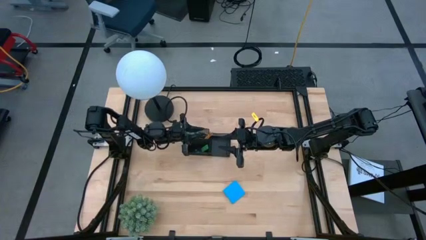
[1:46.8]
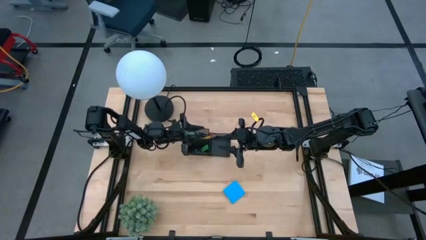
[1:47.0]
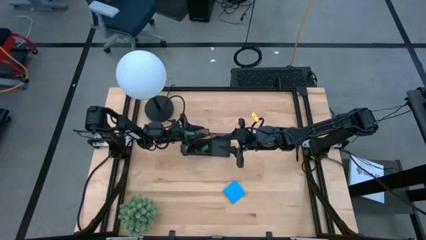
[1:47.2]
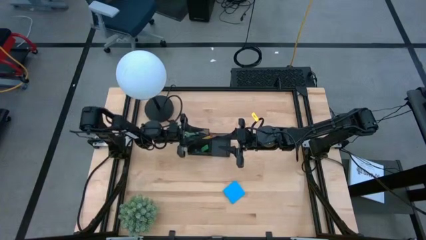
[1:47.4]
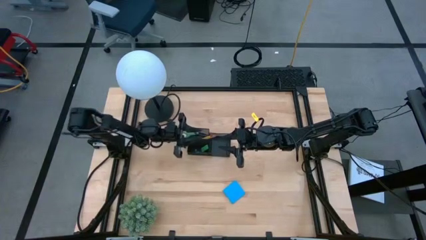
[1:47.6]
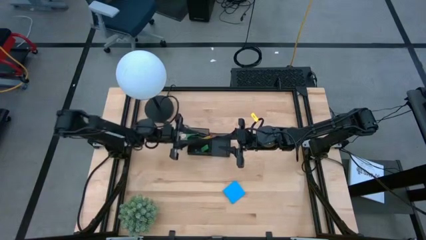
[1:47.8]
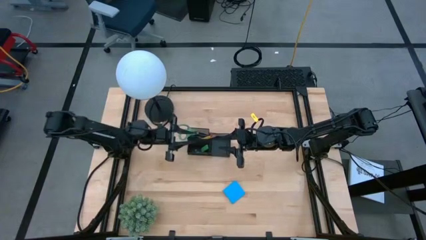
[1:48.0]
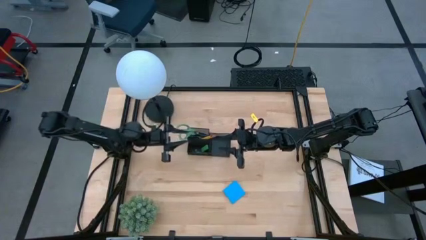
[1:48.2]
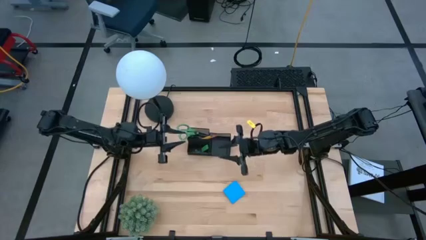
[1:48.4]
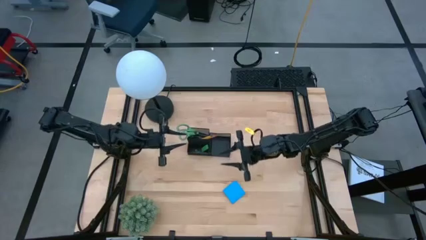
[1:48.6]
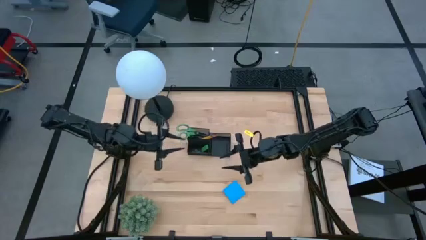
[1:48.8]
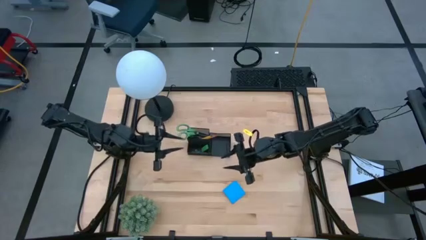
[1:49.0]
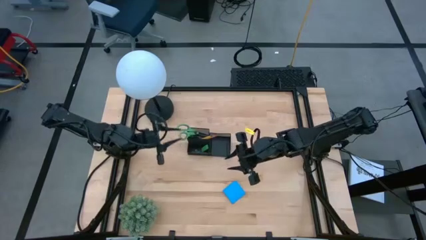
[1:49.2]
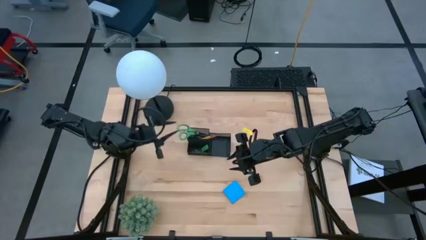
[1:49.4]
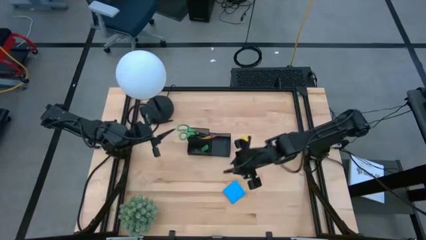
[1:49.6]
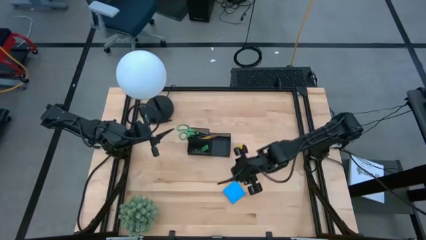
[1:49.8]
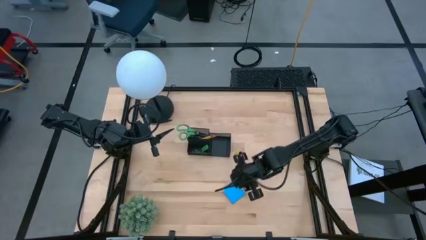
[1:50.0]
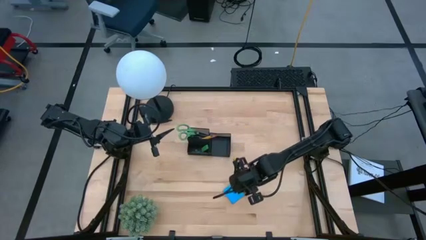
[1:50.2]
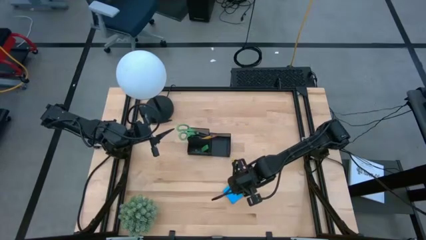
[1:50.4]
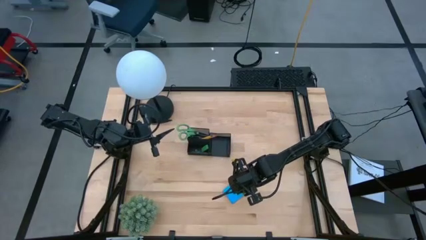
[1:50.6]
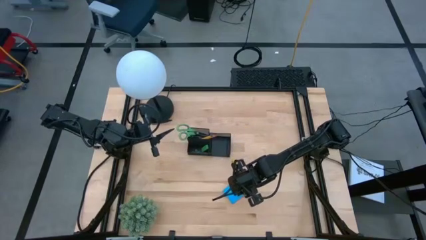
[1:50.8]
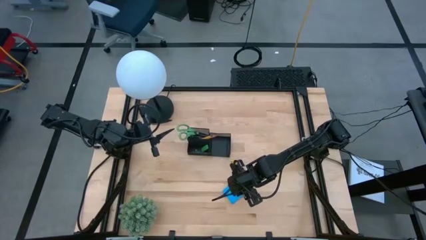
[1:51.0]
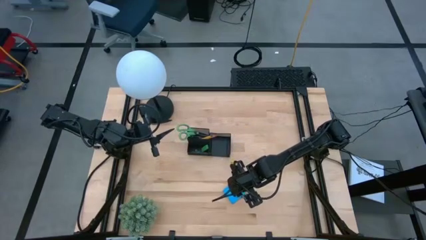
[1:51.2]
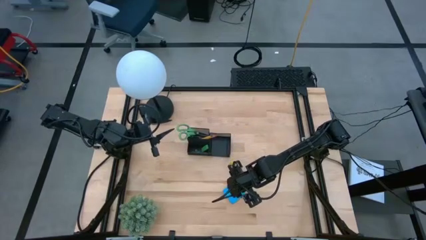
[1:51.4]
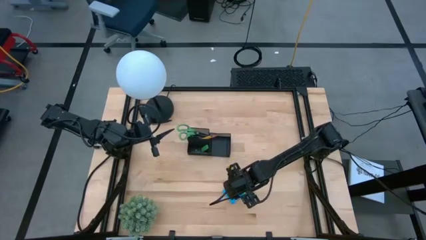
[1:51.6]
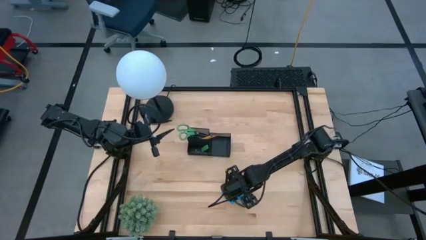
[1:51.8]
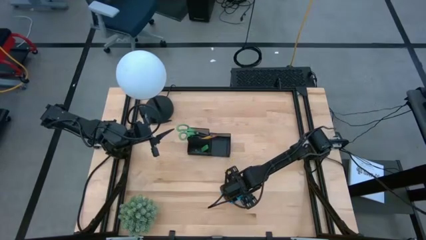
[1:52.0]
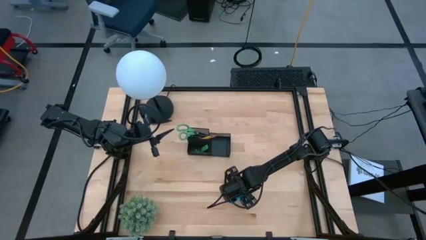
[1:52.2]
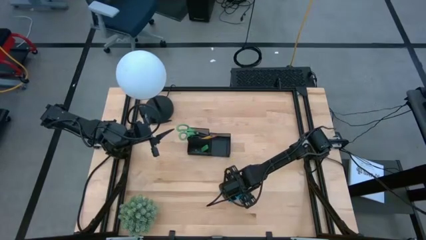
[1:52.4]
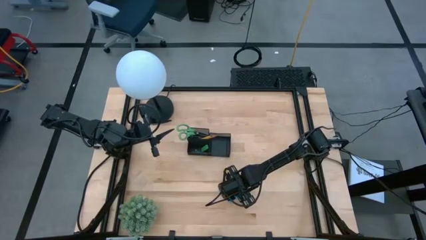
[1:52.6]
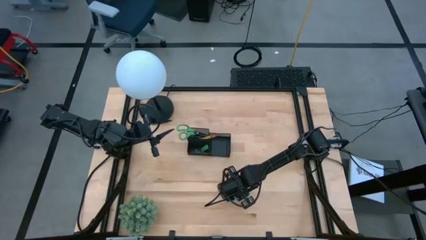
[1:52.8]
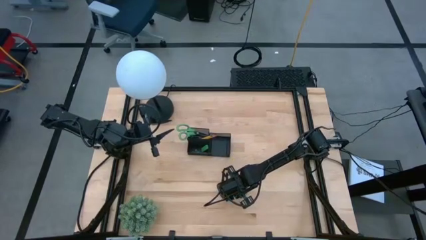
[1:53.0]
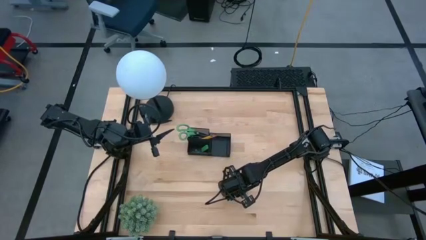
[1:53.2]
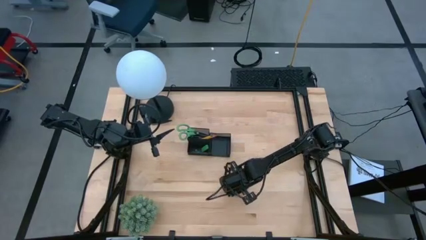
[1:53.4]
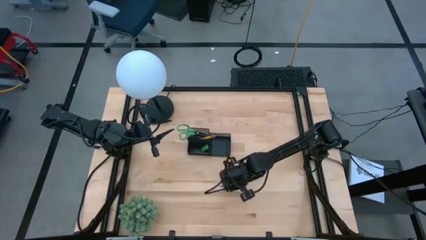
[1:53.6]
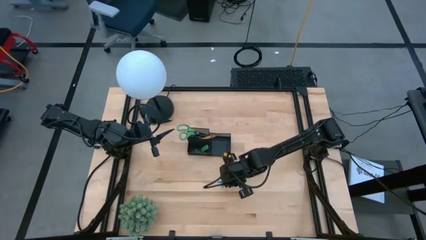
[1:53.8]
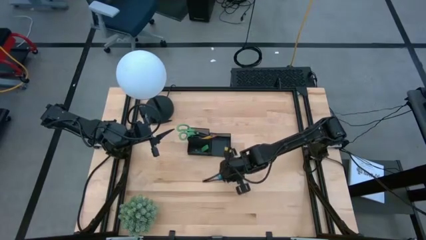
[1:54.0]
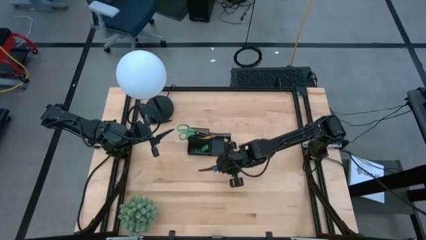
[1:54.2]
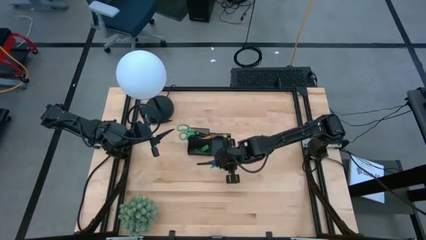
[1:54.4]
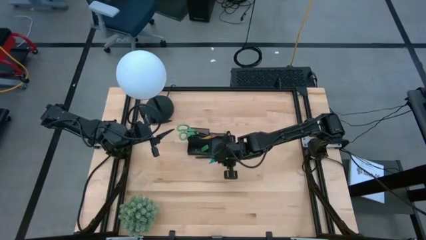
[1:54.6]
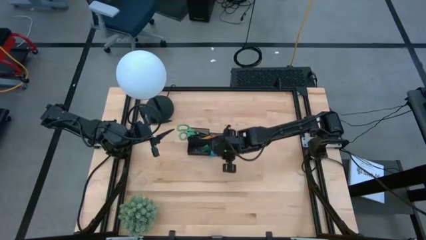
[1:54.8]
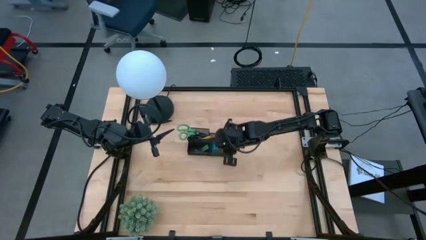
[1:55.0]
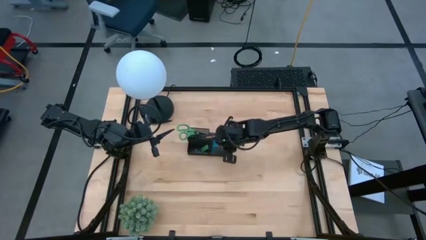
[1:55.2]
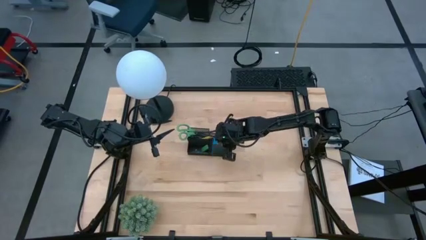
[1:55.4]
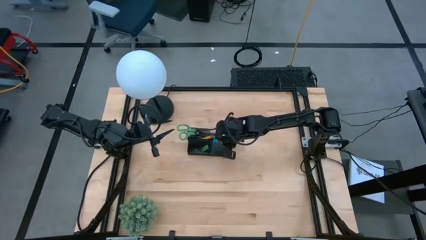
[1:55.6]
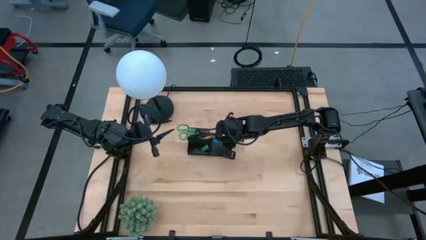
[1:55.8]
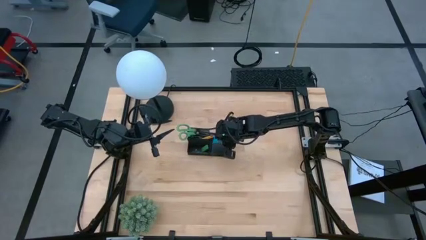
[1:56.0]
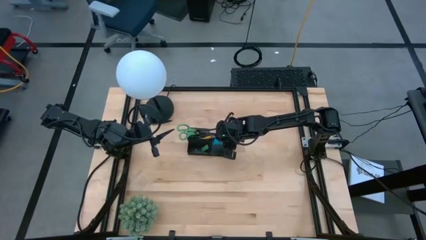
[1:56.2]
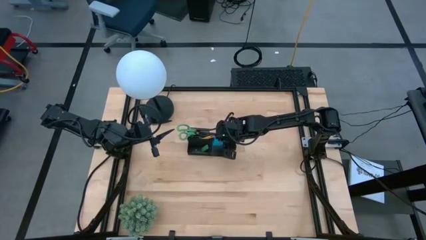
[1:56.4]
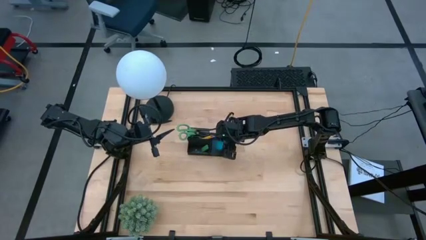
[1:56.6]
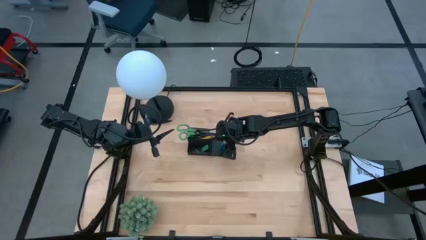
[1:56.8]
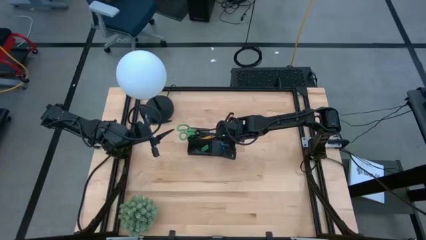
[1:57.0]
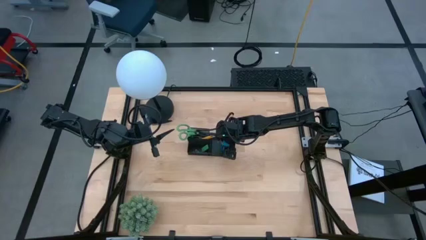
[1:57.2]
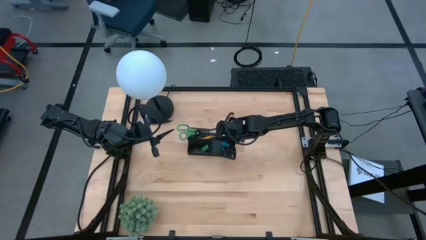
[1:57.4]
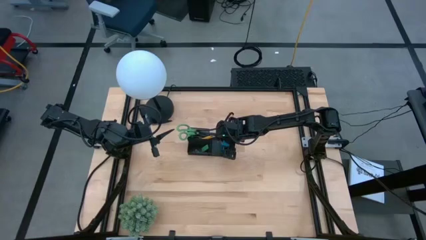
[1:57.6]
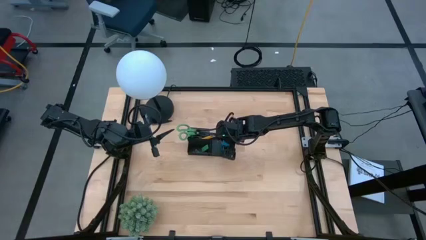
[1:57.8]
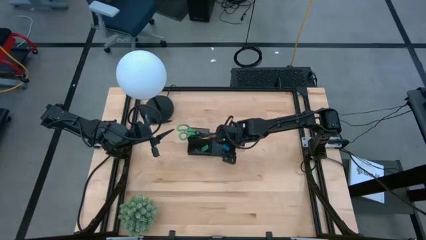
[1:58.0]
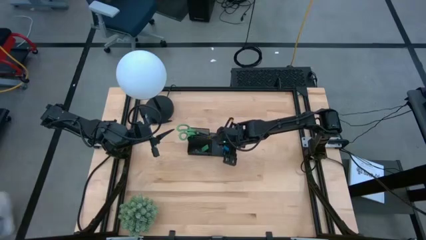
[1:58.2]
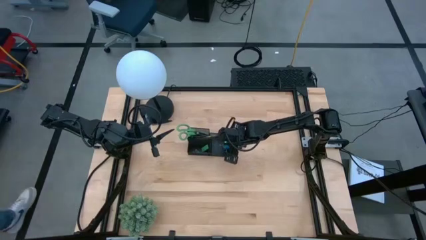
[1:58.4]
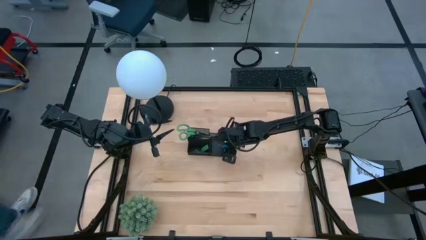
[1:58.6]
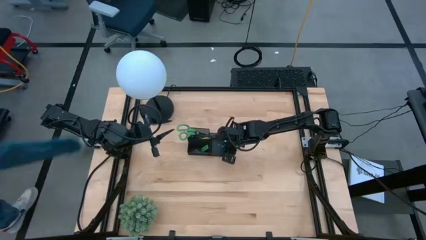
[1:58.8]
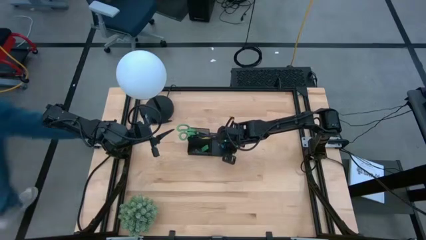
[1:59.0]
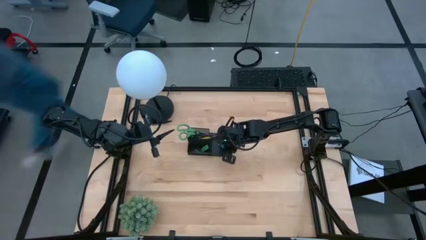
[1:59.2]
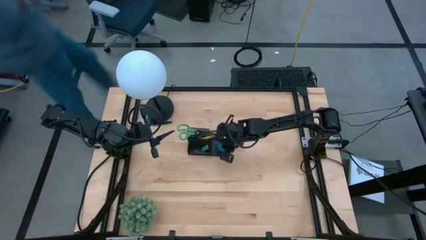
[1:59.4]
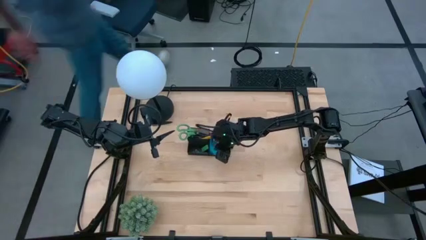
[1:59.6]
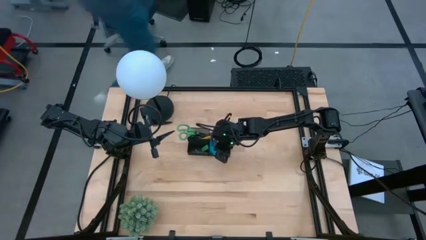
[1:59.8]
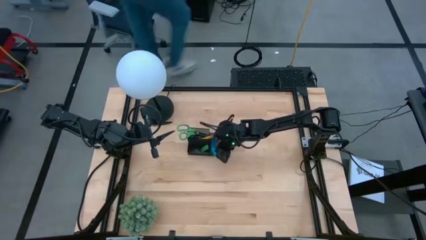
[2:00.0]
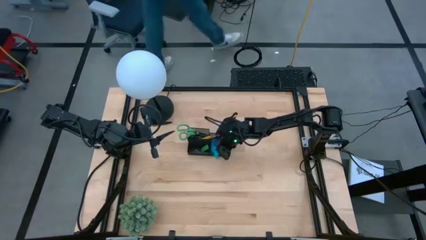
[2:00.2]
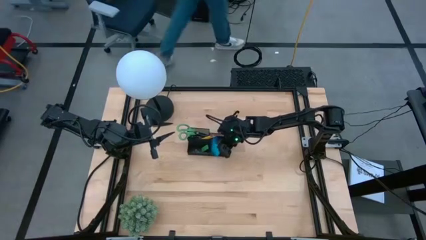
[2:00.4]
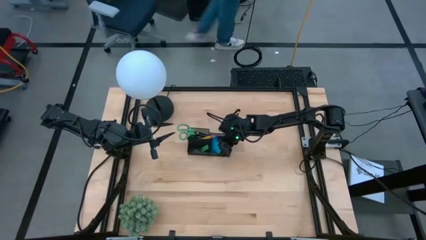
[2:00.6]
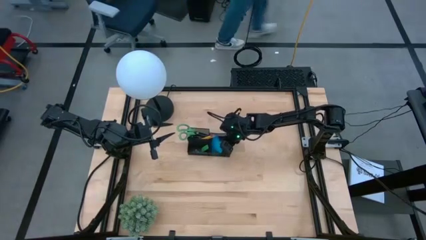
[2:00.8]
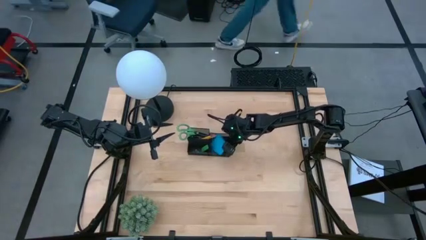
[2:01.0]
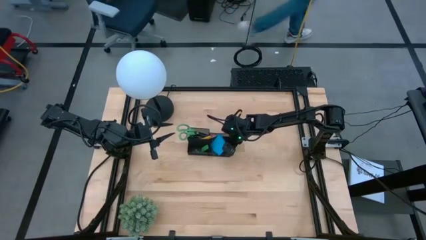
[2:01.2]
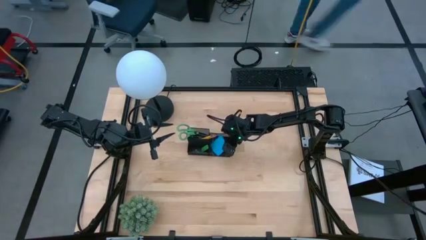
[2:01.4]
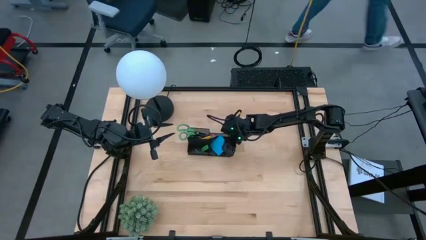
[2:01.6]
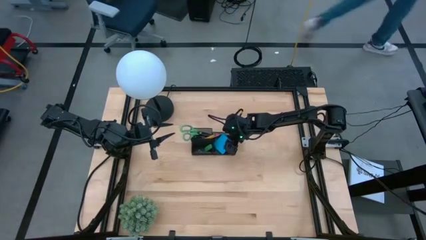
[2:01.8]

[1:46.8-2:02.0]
Task: Pick and place office supplies into organizer
Put the blue sticky notes into the black desk organizer
